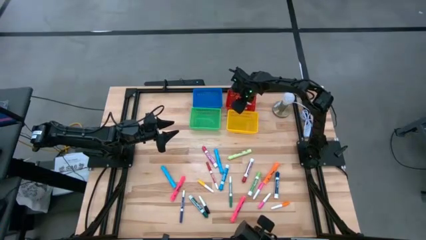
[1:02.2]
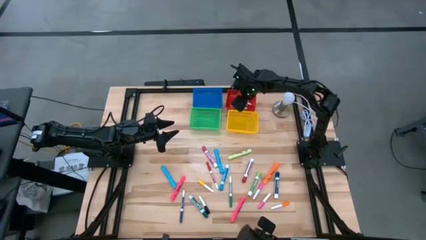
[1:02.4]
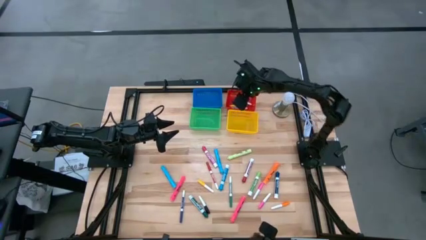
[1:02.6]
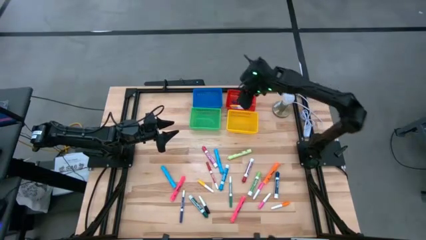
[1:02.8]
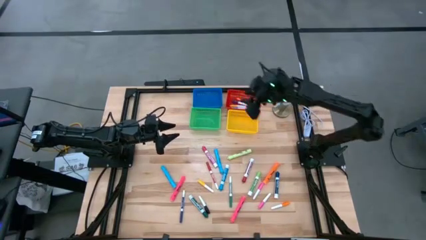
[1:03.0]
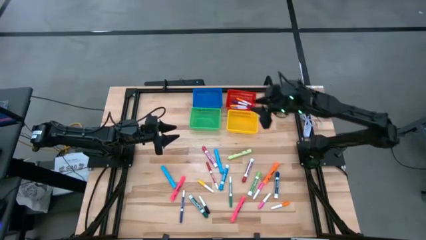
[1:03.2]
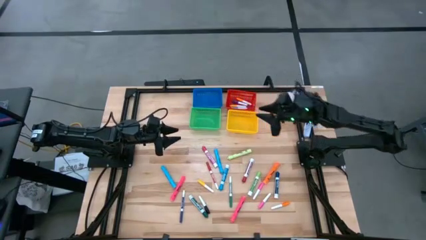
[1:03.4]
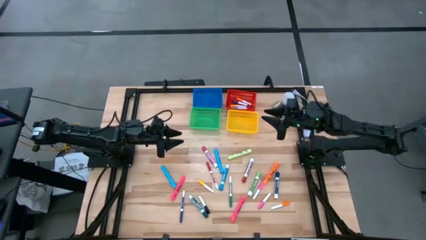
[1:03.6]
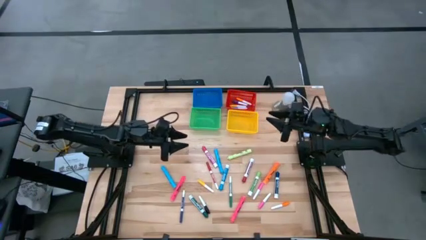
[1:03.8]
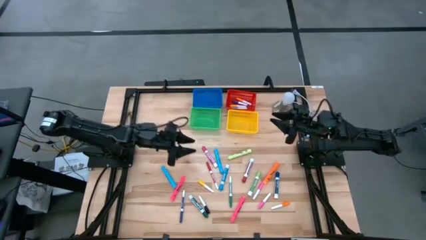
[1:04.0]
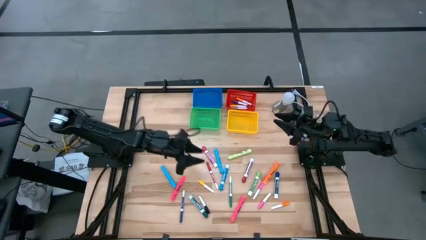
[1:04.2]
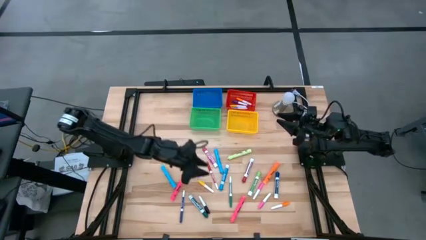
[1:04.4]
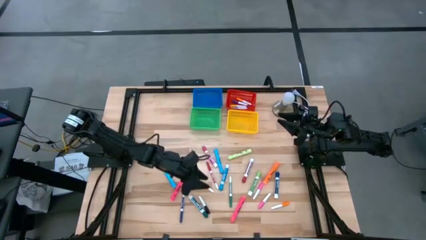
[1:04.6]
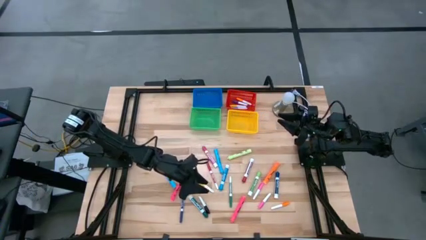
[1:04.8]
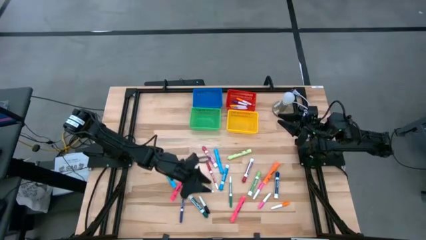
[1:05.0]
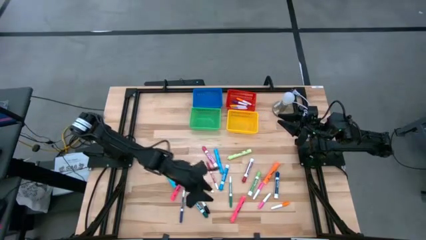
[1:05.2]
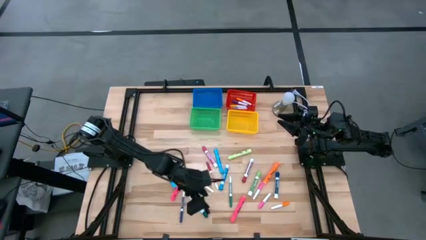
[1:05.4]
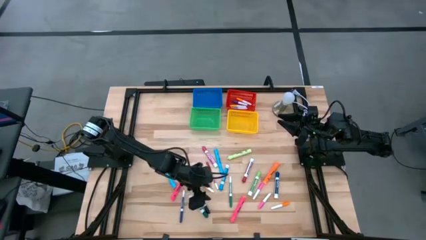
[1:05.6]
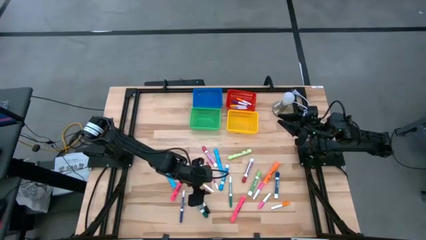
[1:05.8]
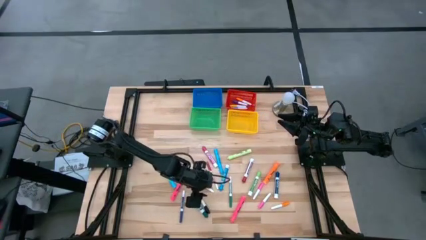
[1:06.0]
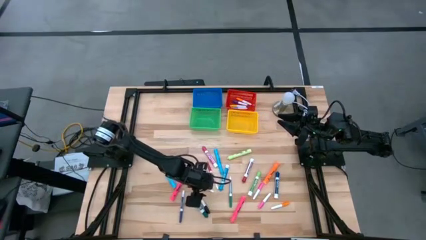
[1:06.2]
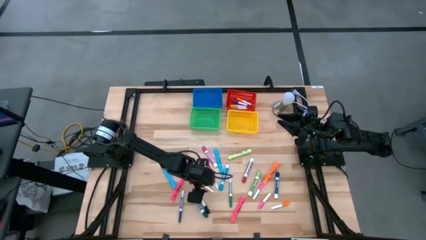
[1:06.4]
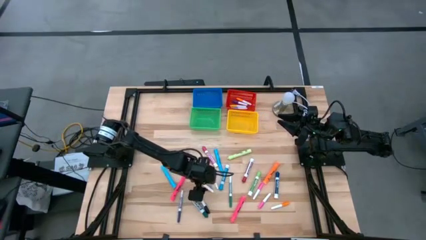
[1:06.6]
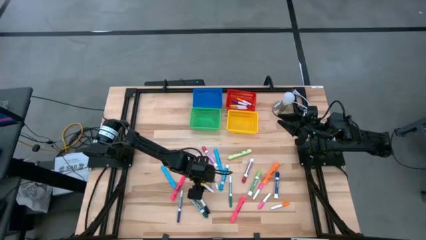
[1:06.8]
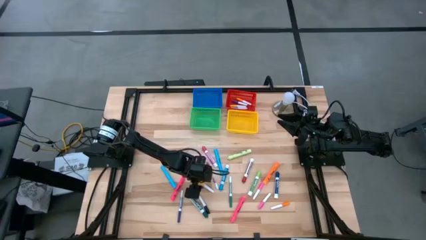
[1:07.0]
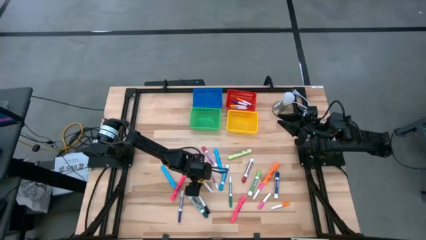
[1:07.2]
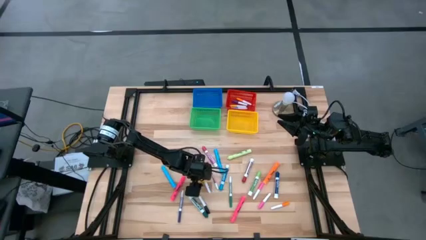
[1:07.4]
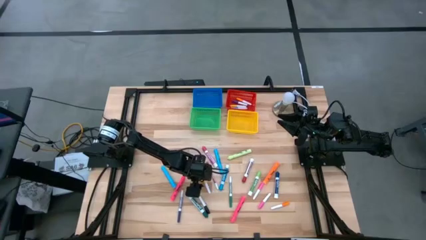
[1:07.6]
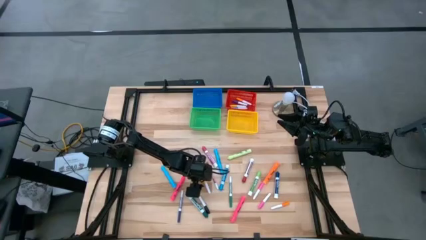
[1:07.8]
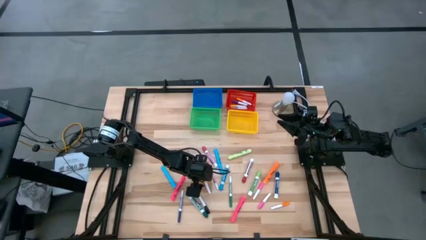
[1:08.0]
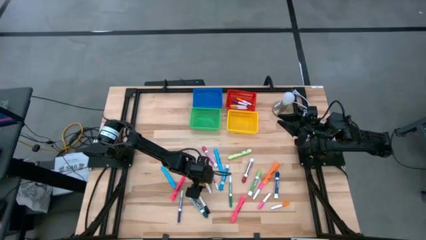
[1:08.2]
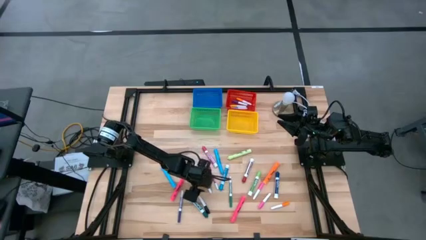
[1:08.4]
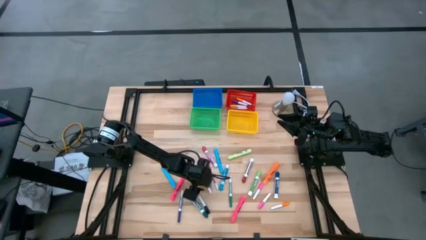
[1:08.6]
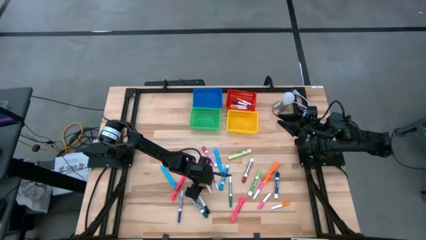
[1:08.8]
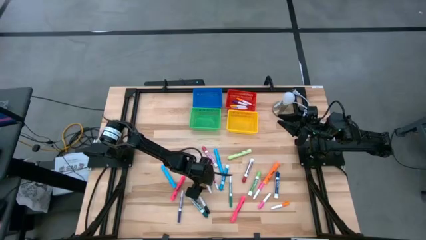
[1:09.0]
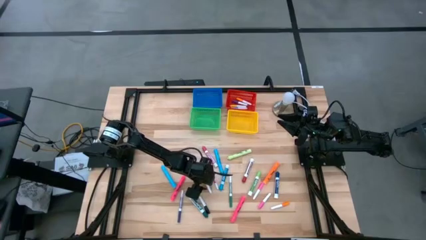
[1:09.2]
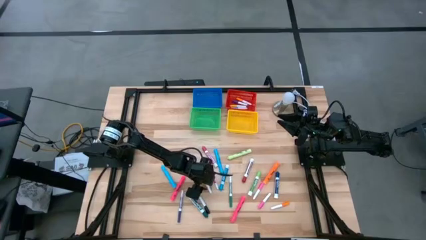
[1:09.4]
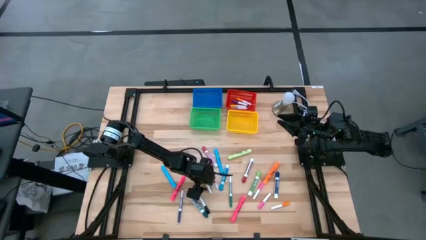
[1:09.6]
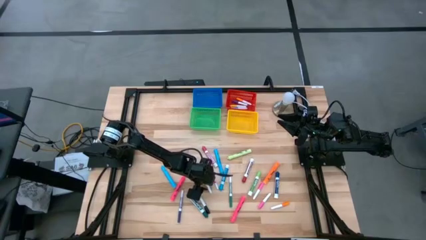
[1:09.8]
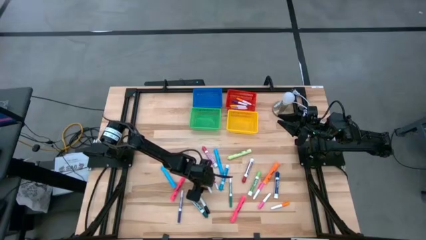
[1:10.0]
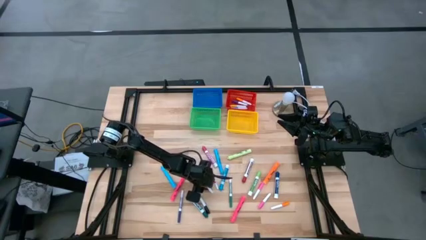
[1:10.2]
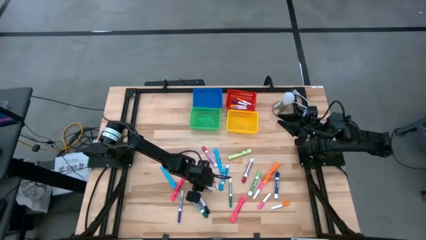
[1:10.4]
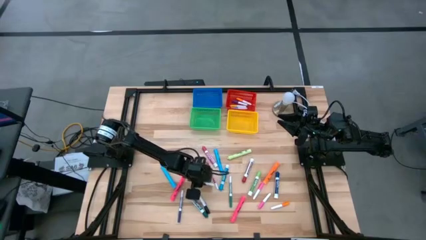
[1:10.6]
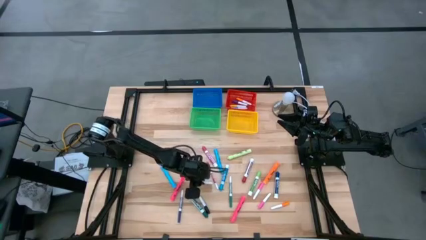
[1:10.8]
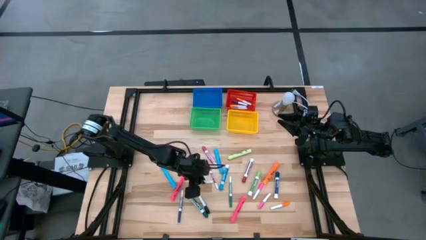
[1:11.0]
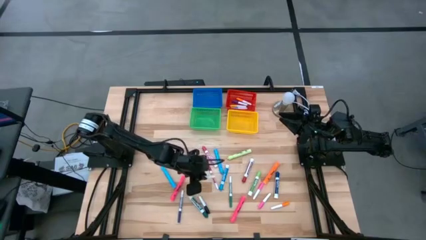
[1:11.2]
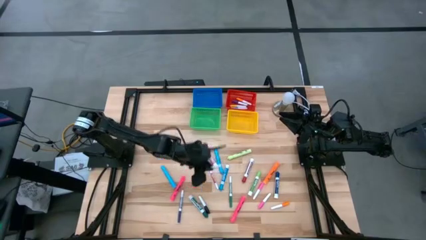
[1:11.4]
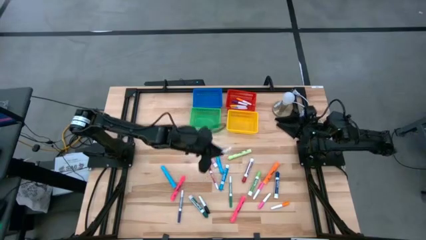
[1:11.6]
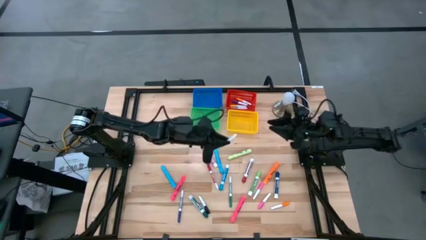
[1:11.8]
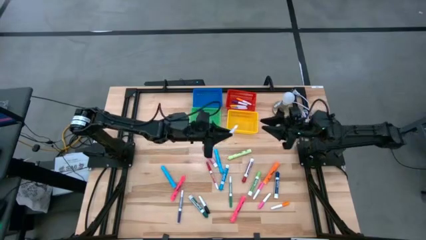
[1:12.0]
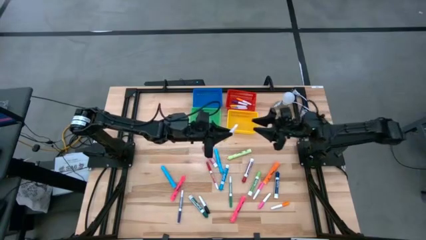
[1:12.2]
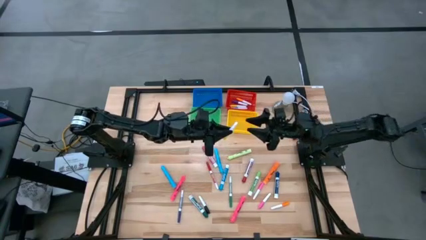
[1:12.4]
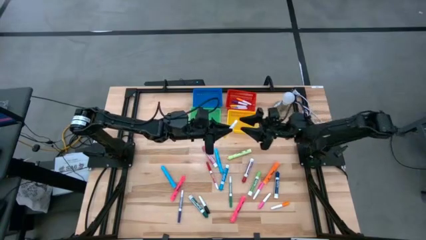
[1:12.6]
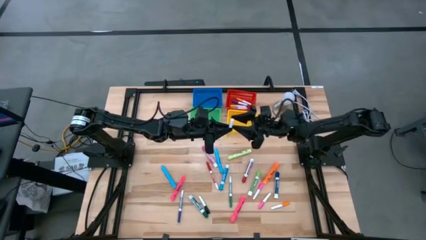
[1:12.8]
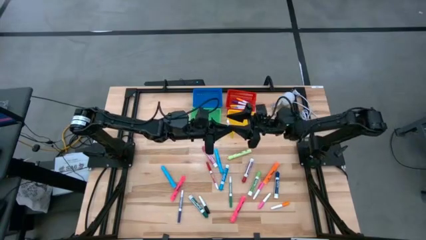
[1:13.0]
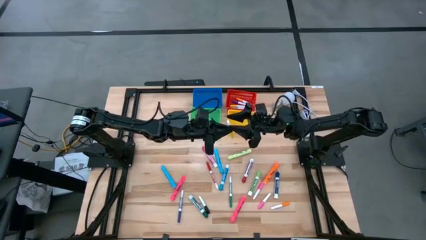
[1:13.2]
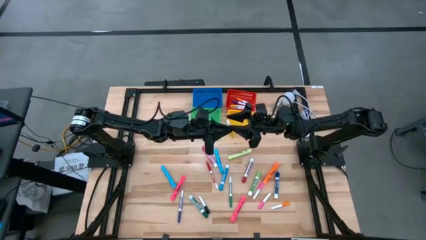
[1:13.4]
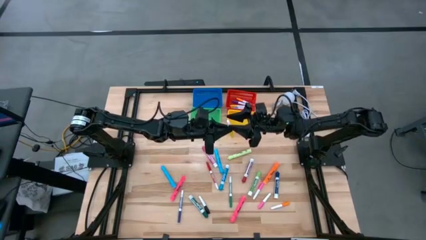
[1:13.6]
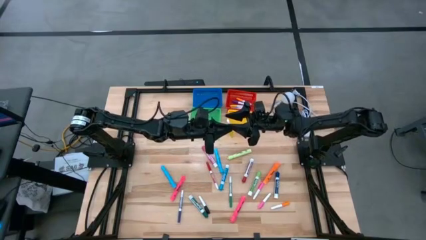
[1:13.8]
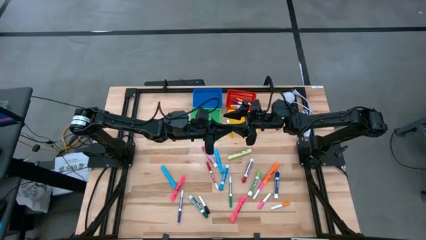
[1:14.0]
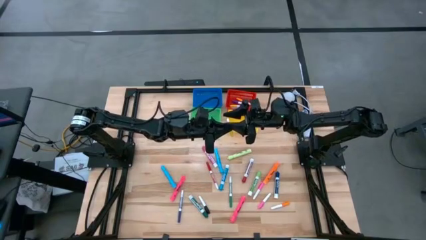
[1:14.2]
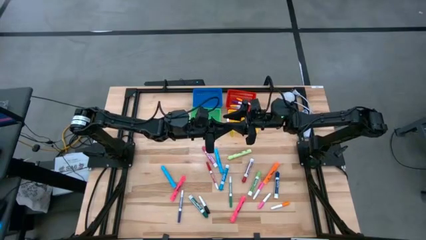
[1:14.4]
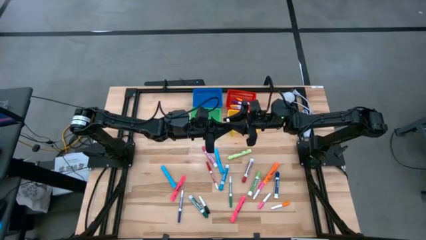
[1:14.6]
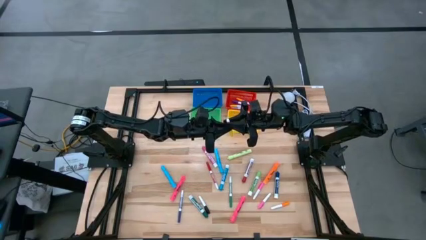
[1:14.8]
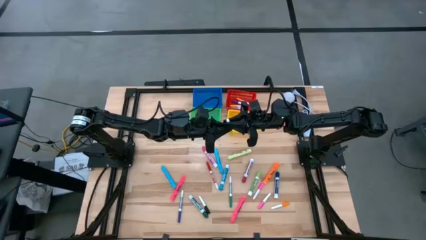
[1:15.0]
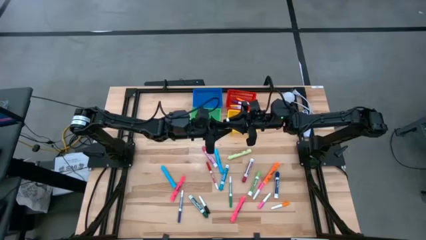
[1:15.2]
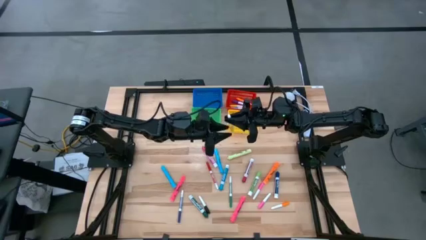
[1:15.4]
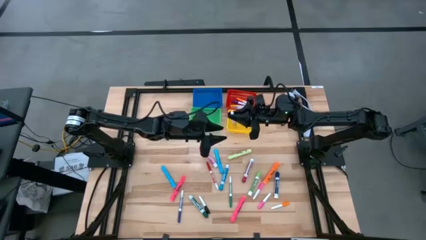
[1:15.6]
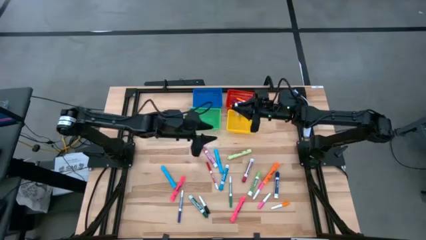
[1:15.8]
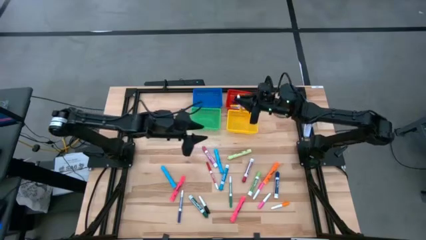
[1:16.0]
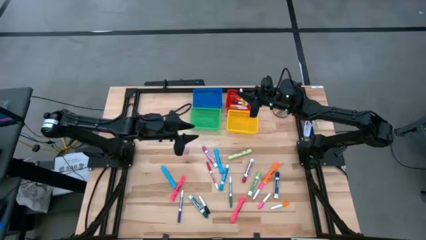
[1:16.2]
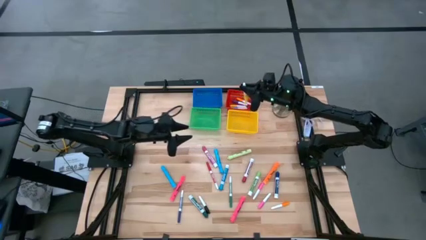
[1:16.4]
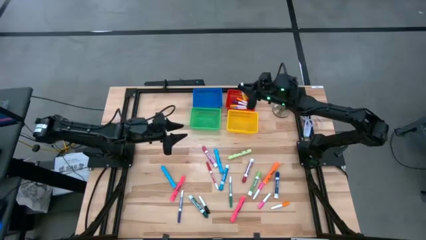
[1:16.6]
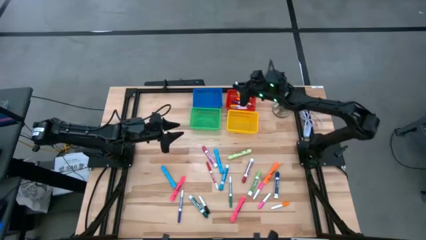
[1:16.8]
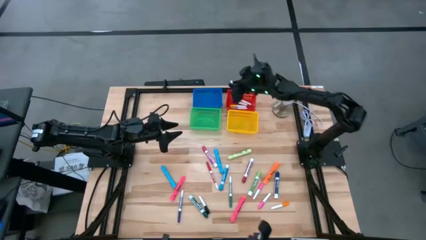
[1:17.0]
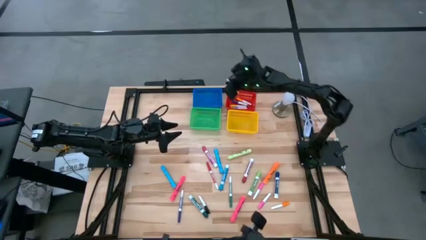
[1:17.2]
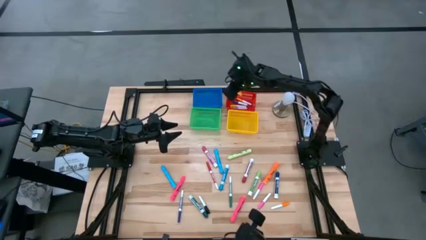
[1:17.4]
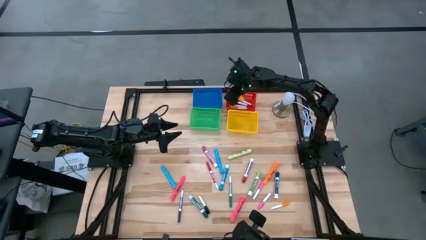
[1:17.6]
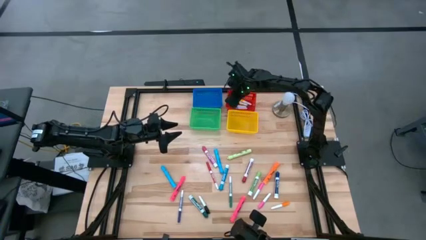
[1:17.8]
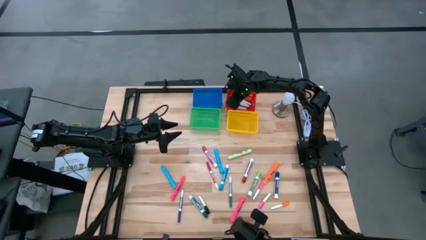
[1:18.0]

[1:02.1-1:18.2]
Task: Pick & Place Markers
Put the yellow pen into the red basket
